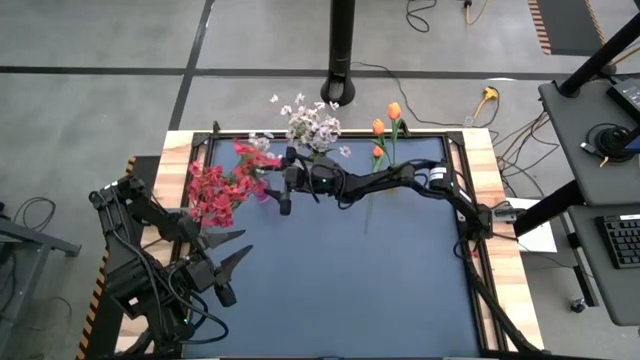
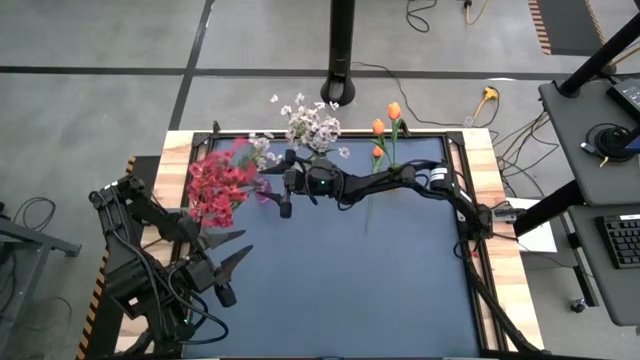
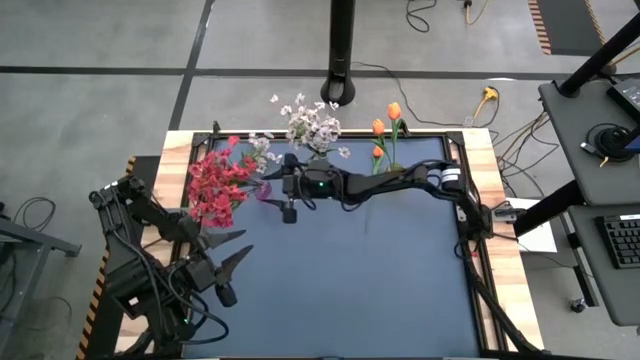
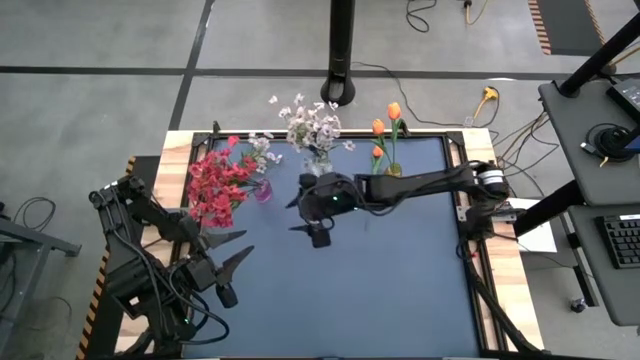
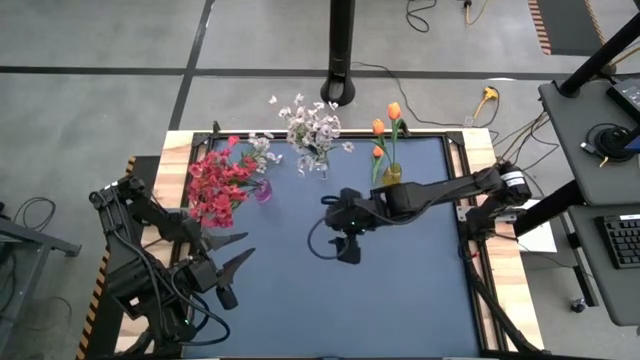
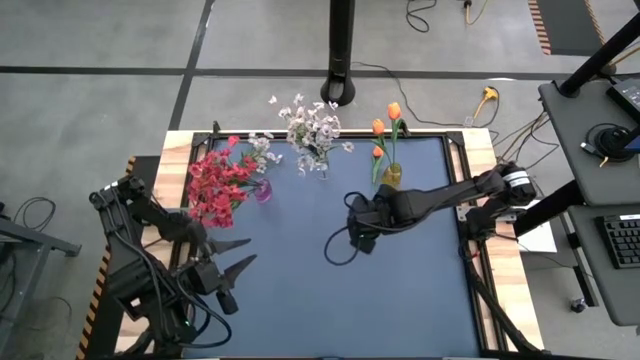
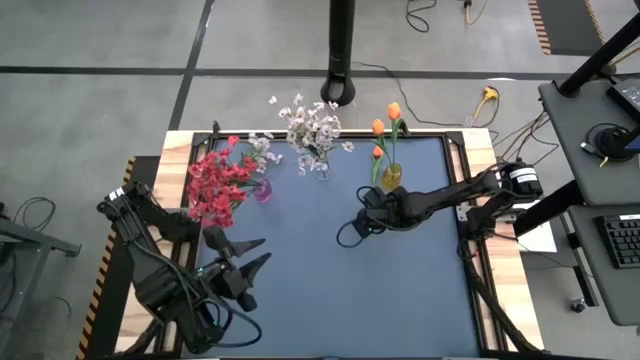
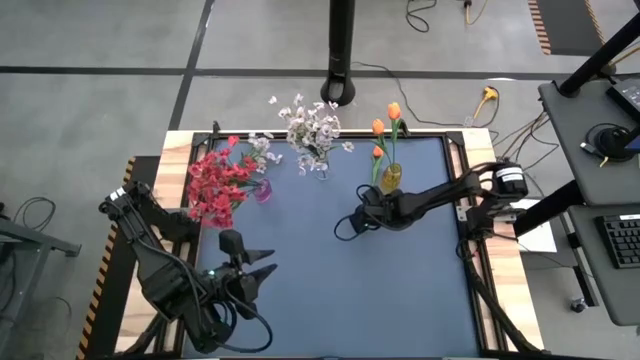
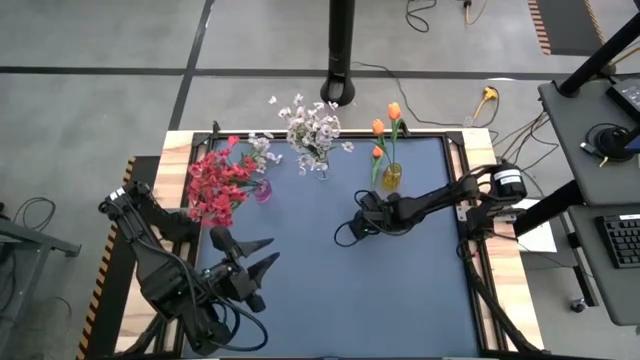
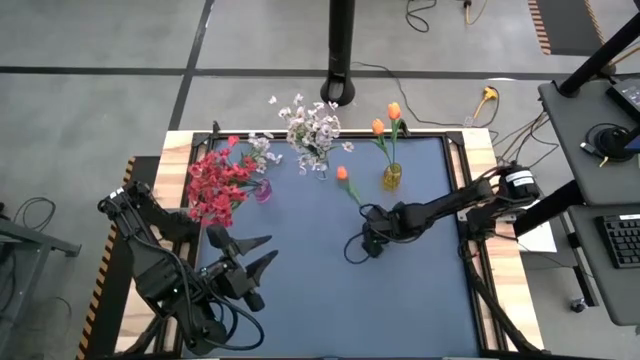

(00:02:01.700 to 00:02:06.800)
Task: Sort flowers into vase by color
Put the orange tulip into the yellow vase

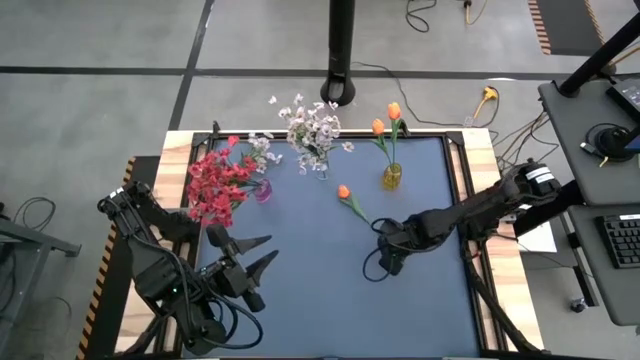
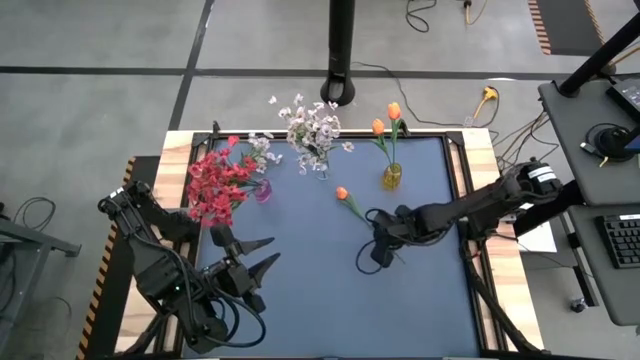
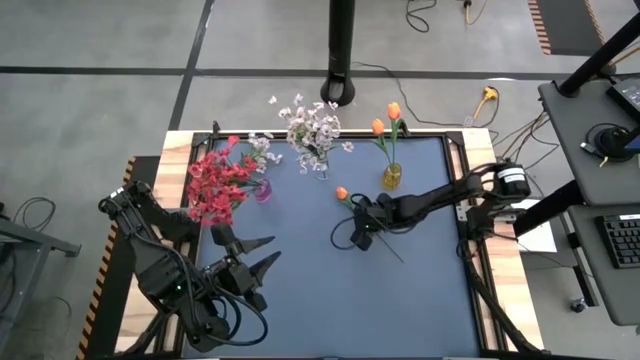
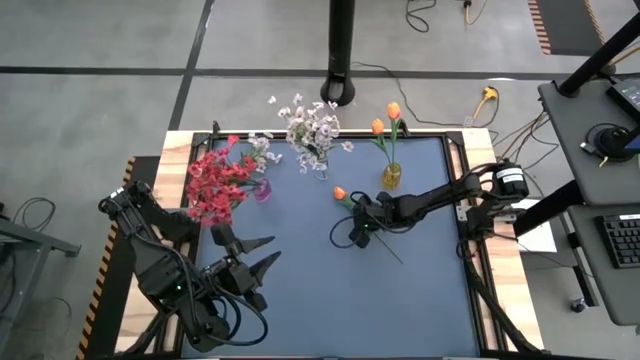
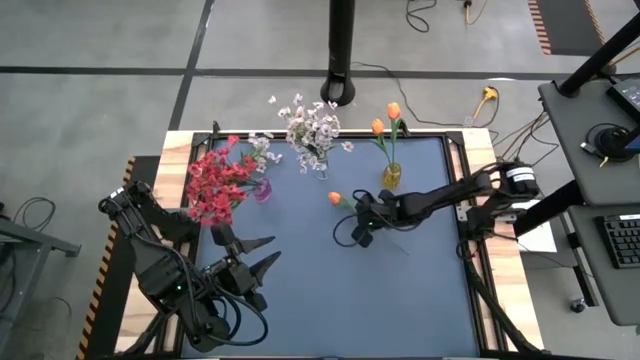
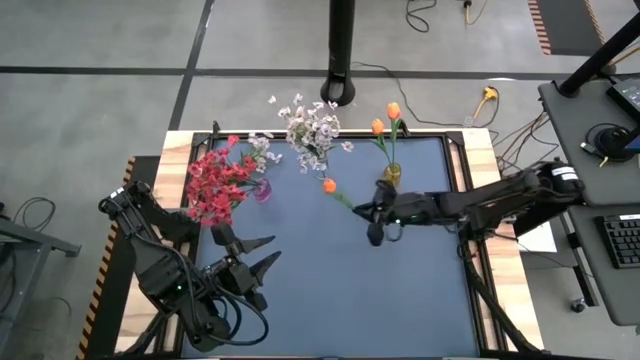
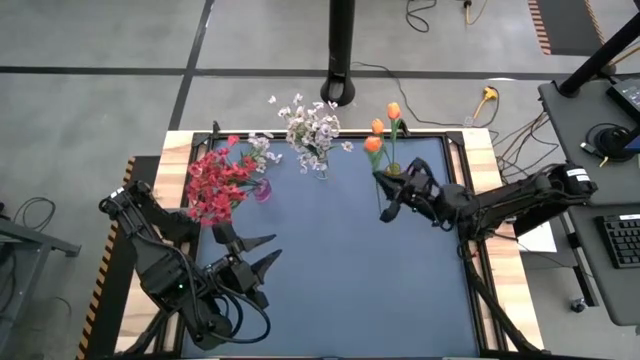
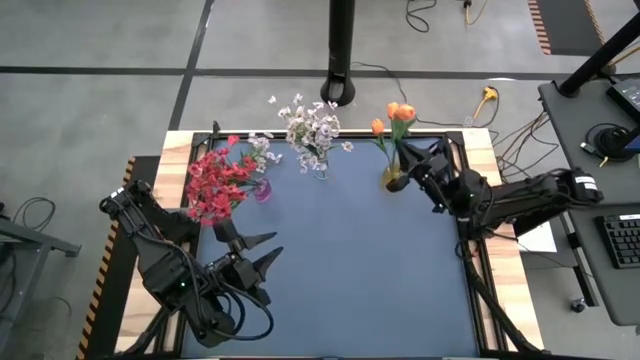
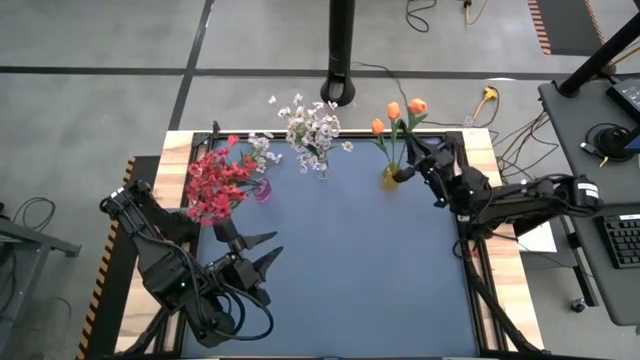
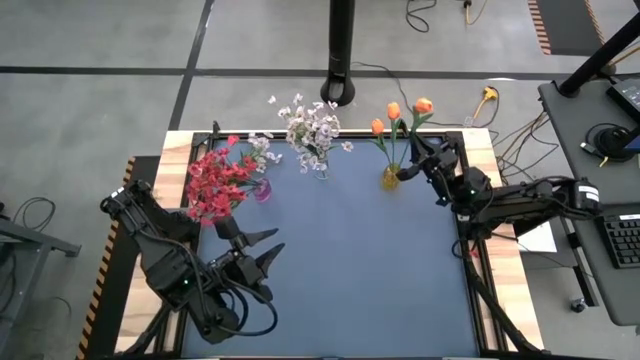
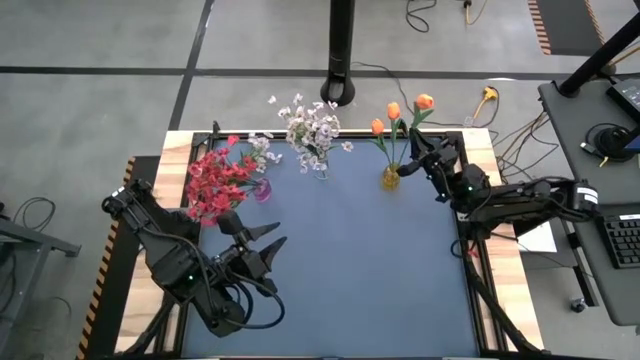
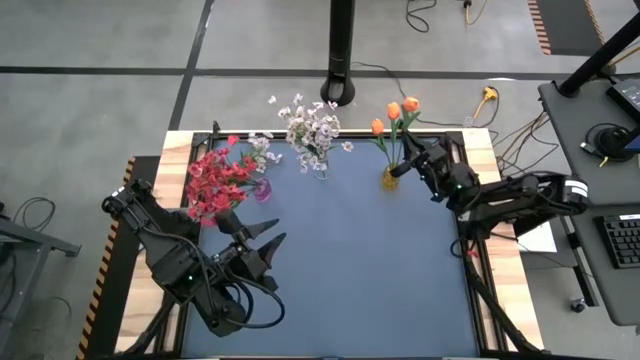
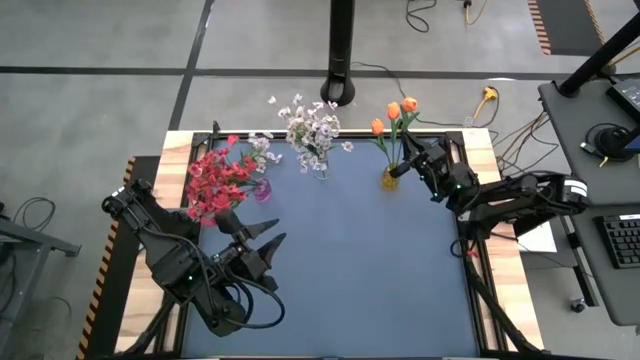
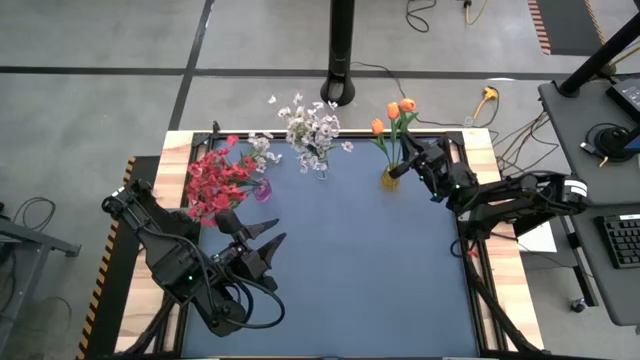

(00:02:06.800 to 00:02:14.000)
Put the orange tulip into the yellow vase

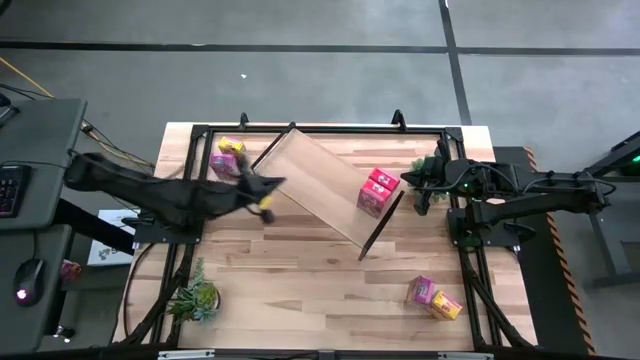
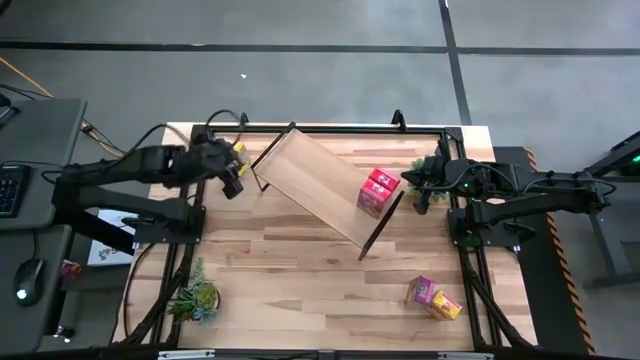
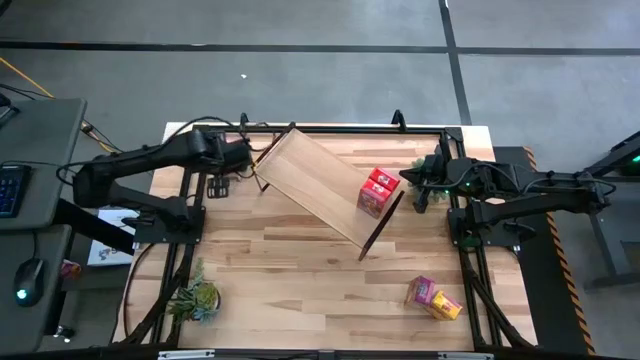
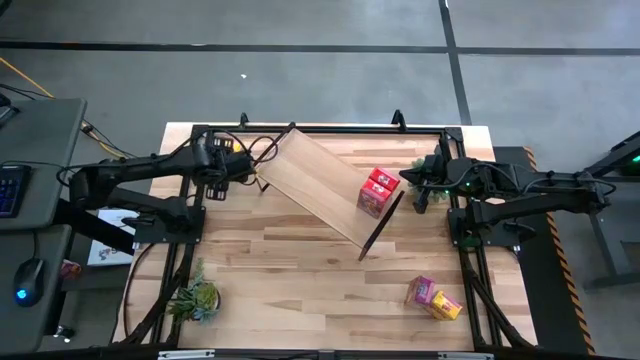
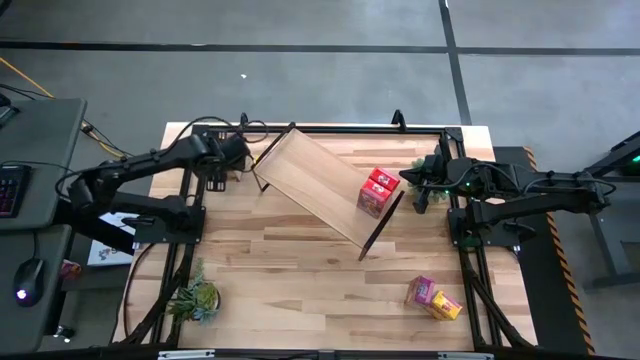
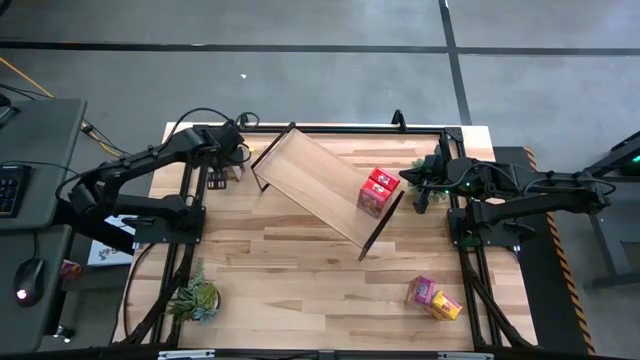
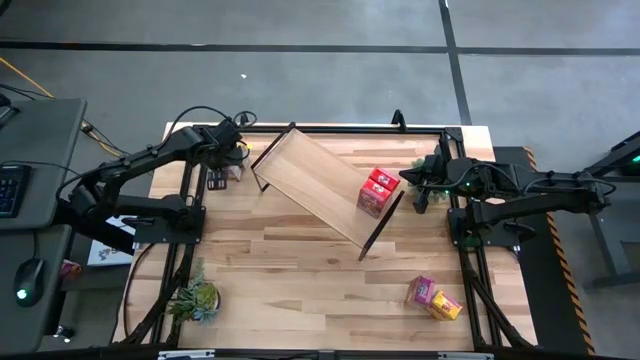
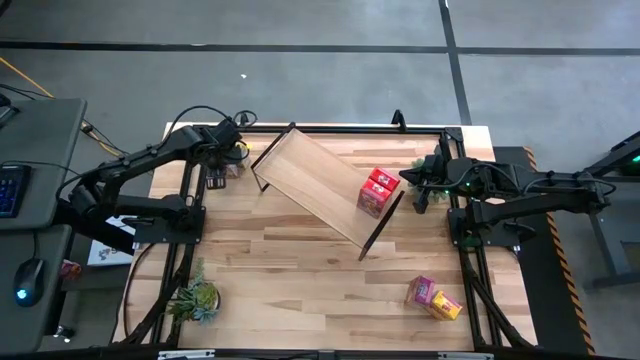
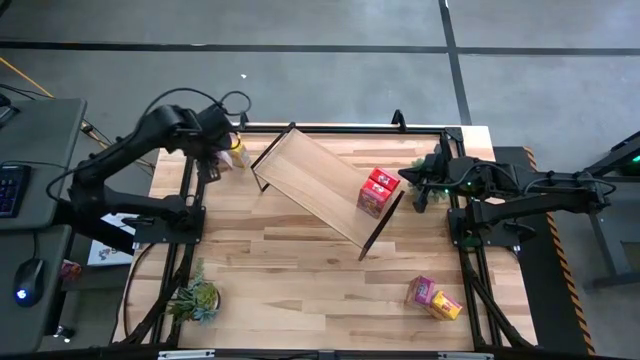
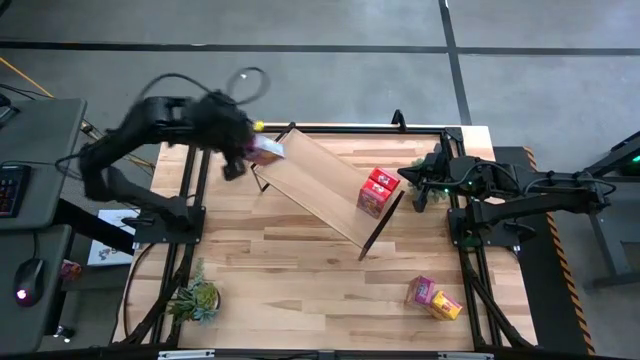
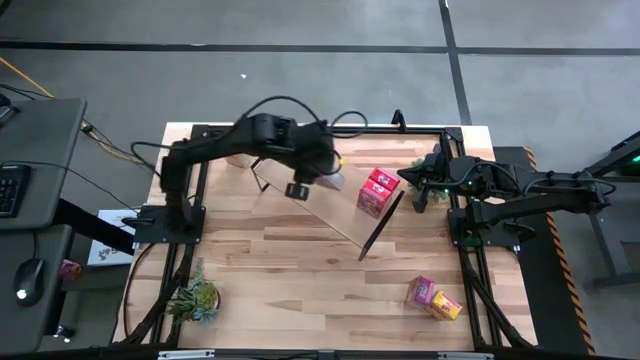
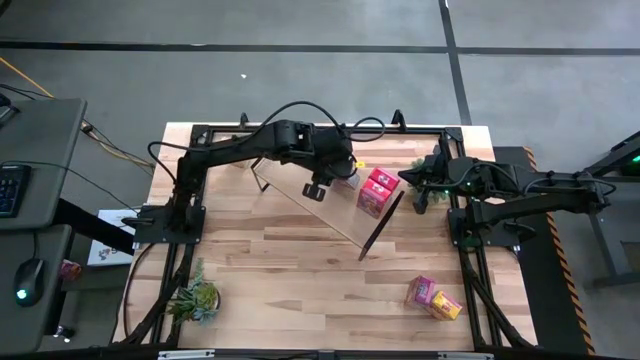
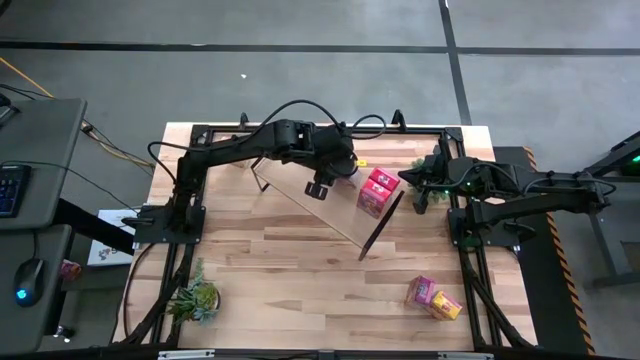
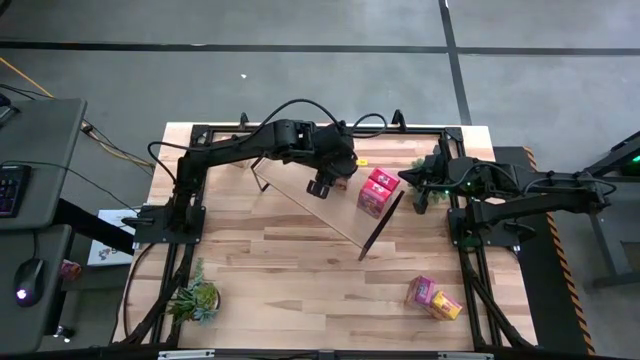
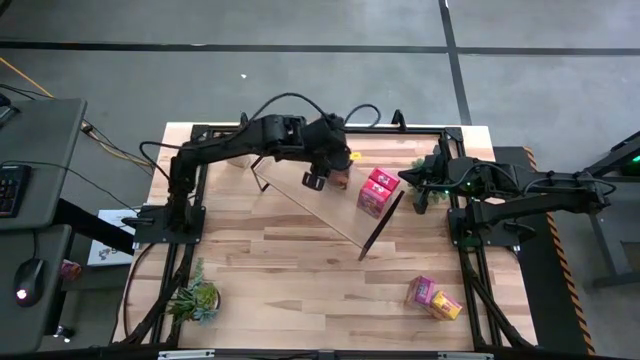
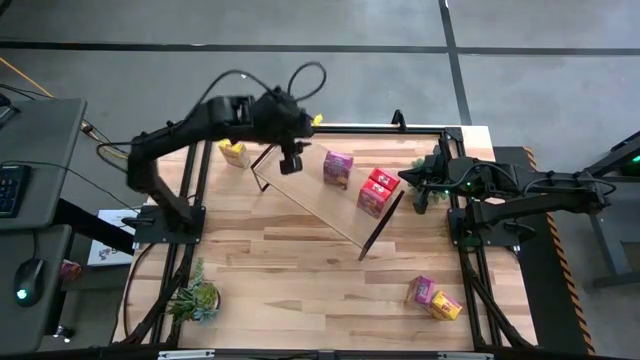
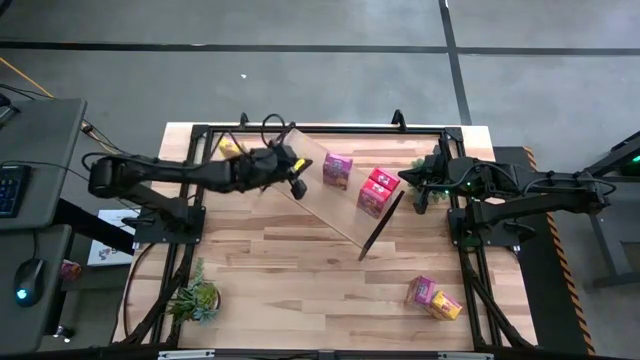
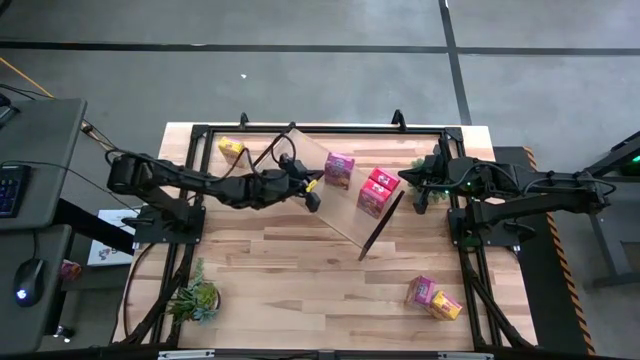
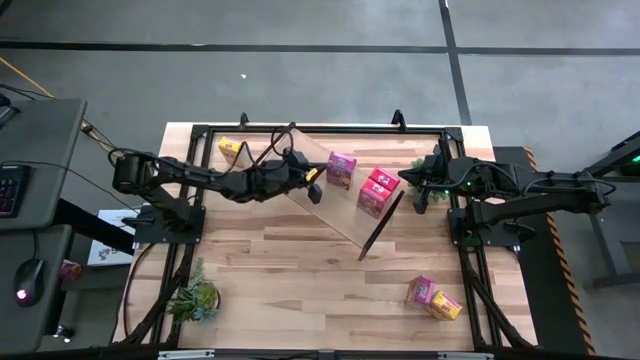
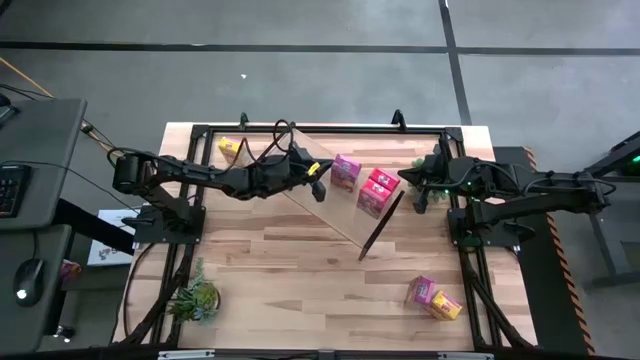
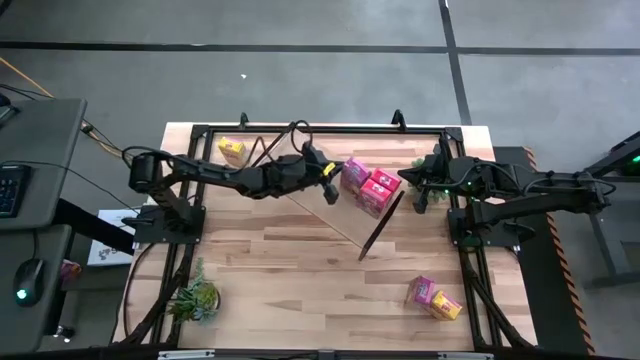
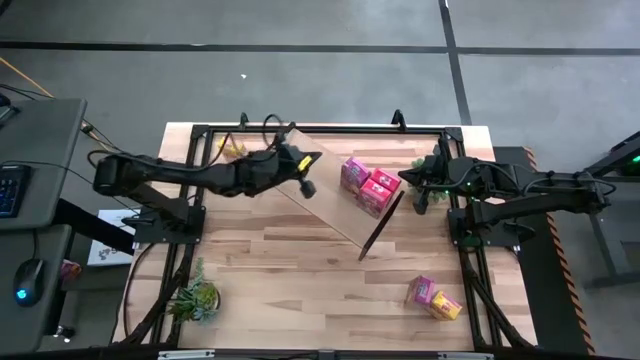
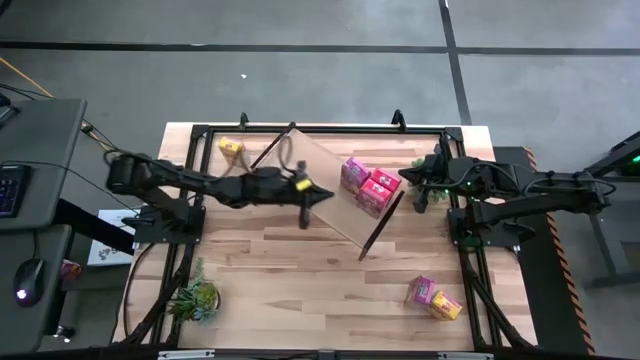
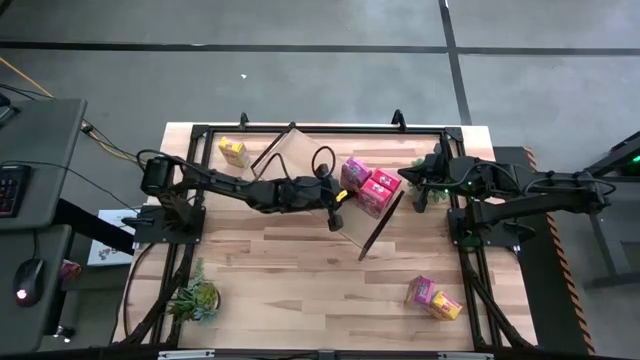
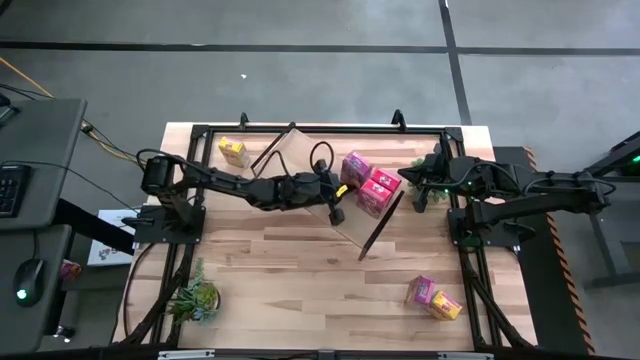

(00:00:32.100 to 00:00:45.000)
Task: Stack cereal on shelf
Put the top purple cereal box on the shelf
